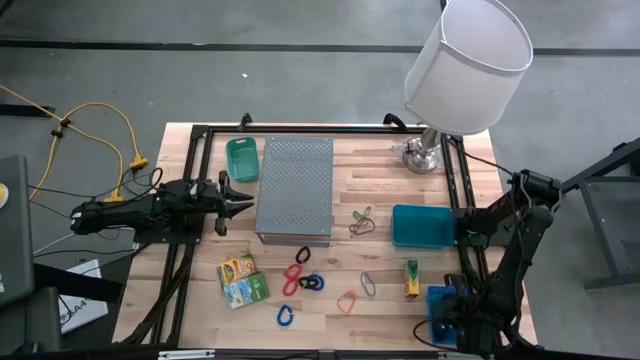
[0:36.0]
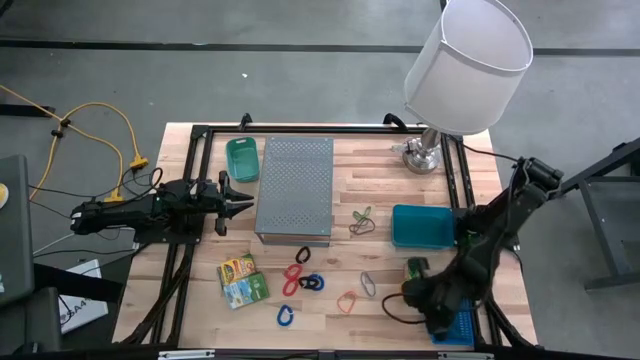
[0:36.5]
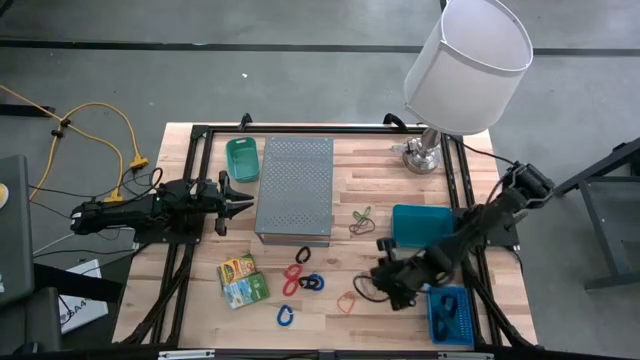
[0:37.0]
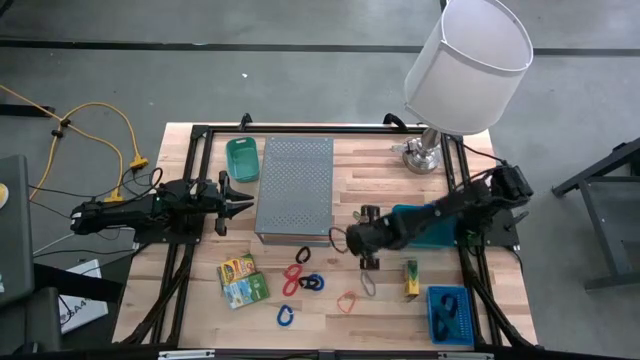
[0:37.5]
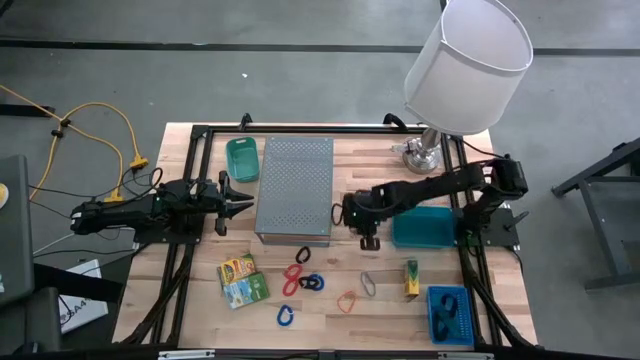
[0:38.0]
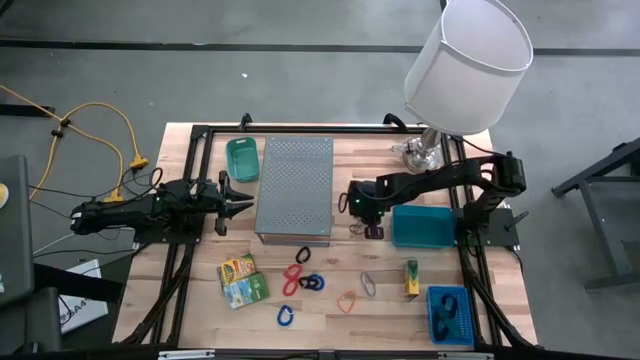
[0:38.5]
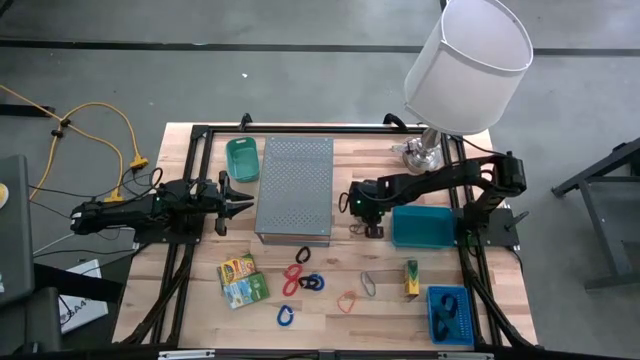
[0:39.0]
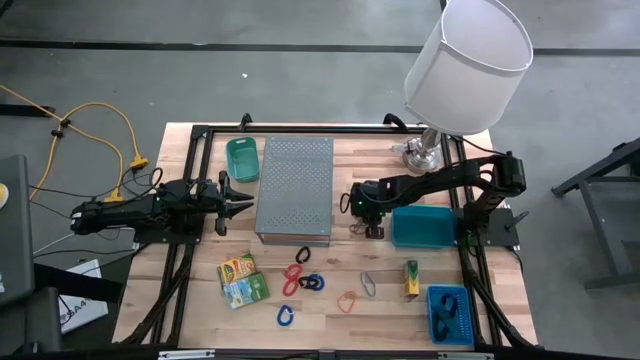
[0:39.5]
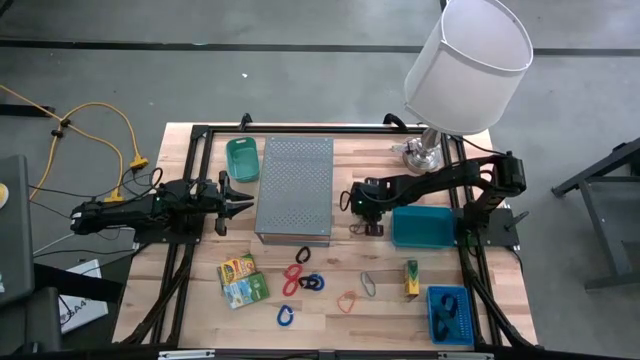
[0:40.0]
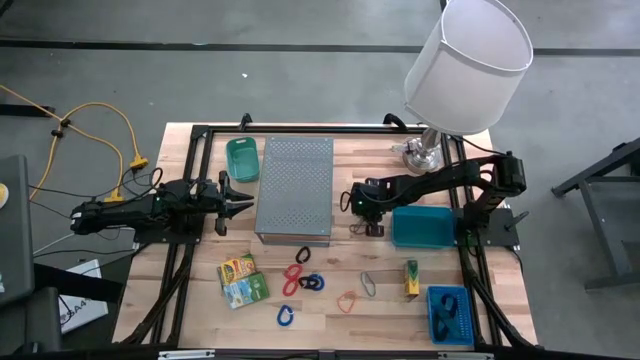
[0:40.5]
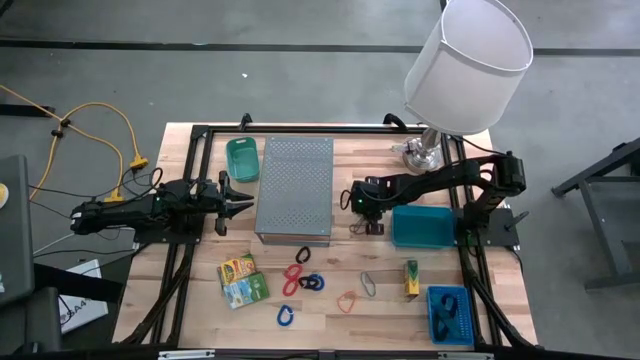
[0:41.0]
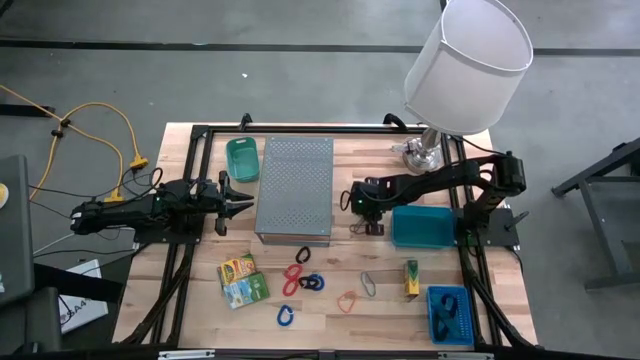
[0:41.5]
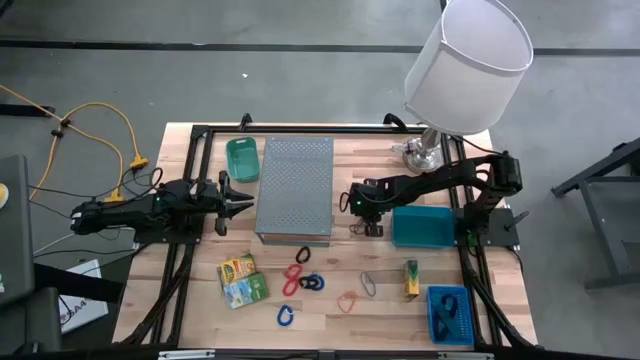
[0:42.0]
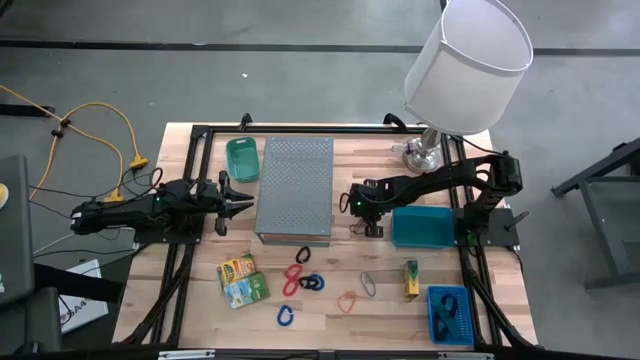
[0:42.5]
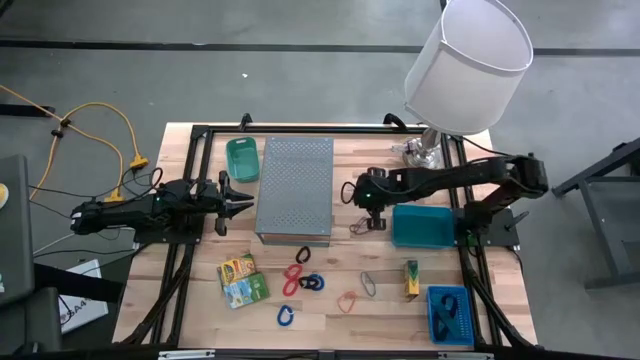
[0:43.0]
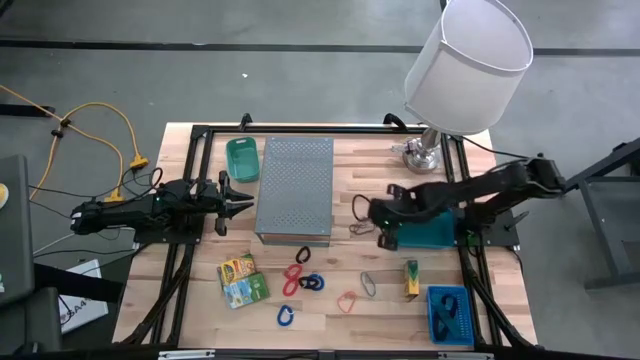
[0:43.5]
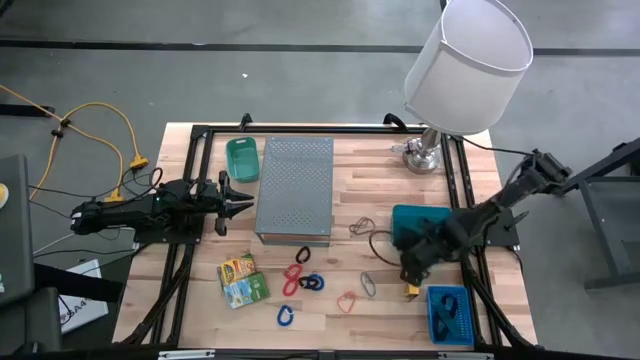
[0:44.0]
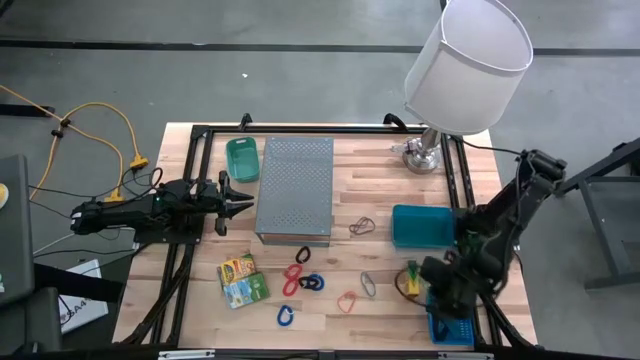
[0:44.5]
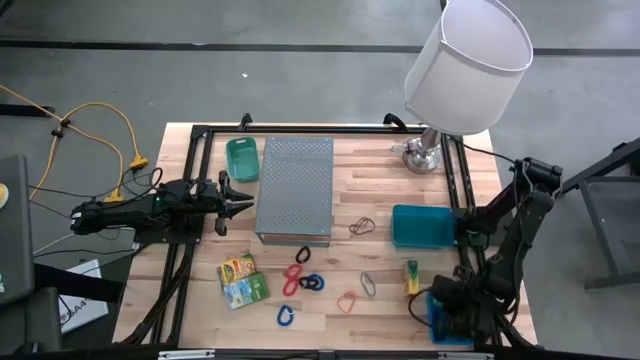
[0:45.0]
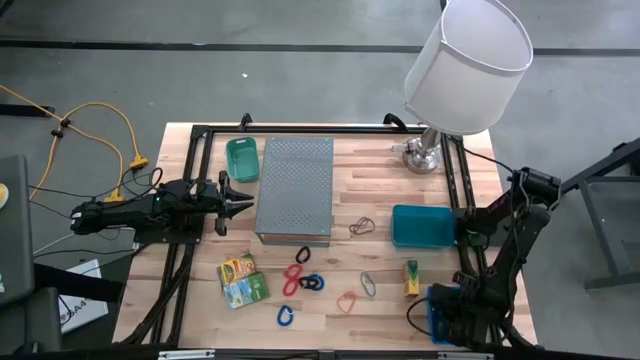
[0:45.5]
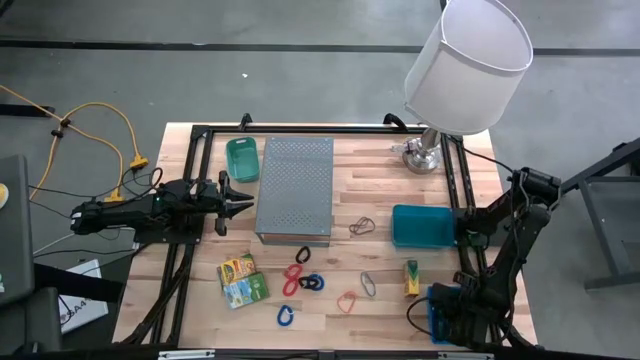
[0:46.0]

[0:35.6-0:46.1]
Task: Pick & Place Office Desk Supplies
Put the green rubberband into the blue basket

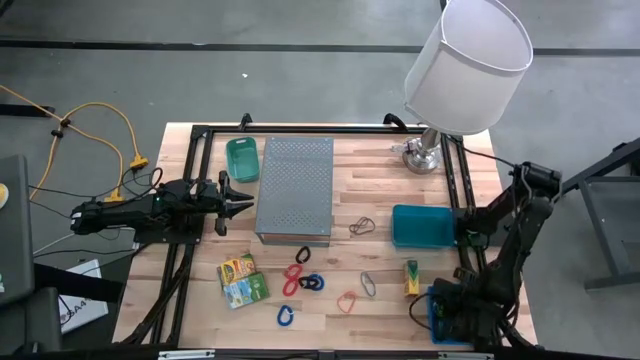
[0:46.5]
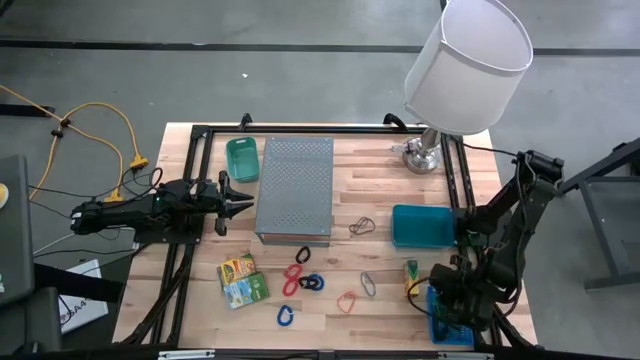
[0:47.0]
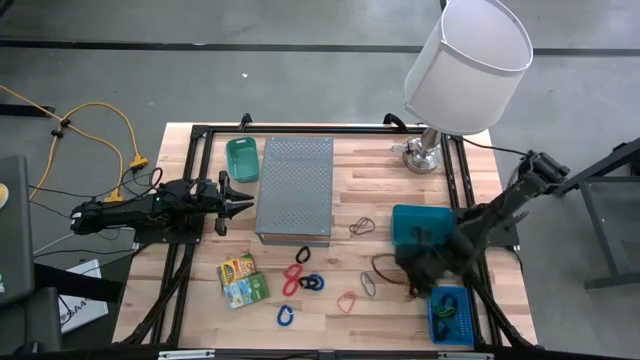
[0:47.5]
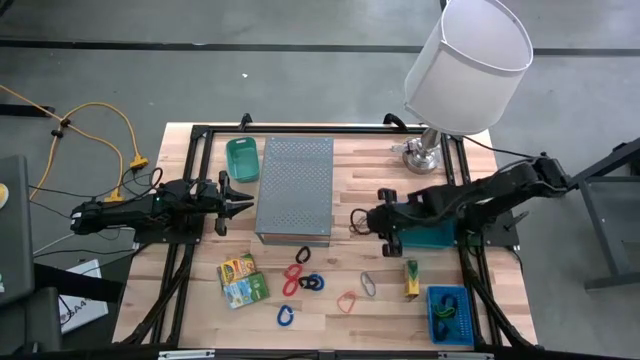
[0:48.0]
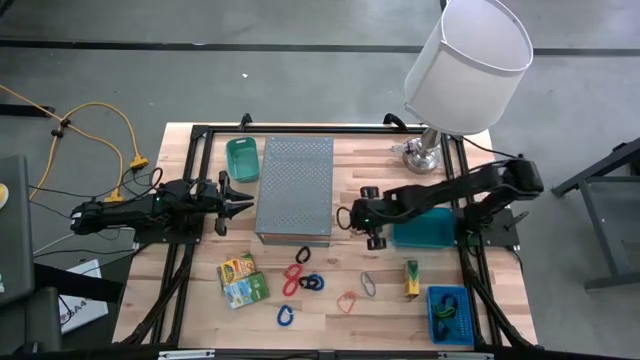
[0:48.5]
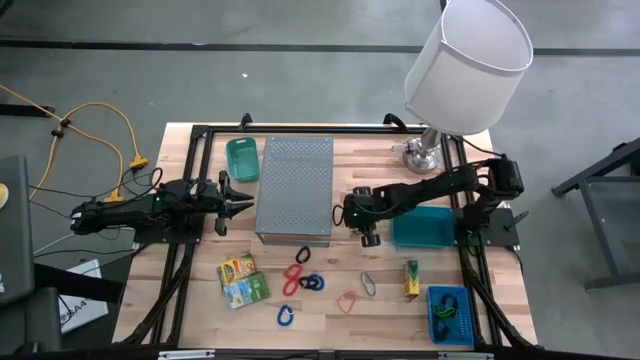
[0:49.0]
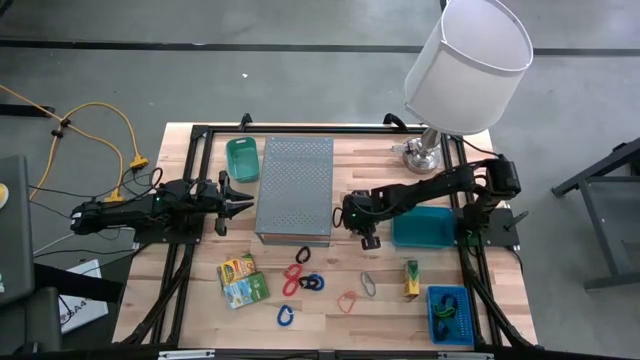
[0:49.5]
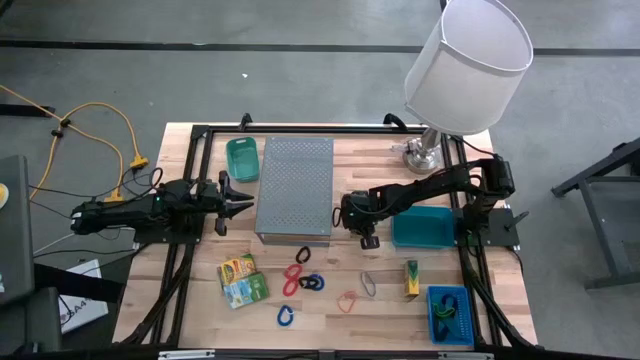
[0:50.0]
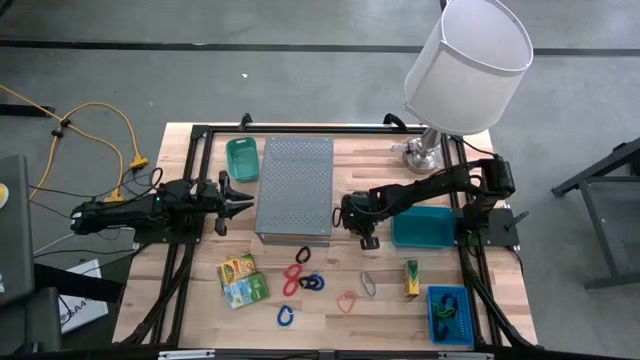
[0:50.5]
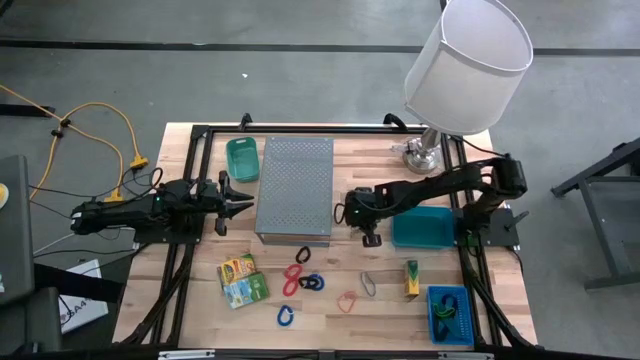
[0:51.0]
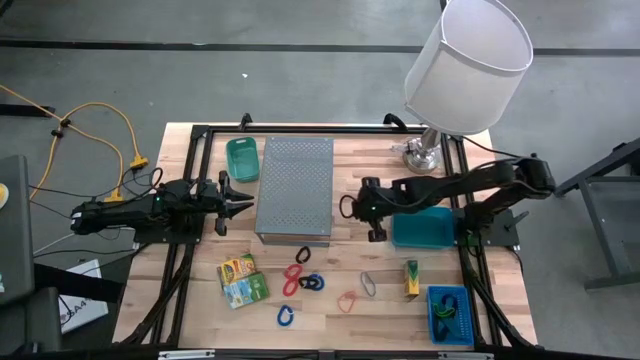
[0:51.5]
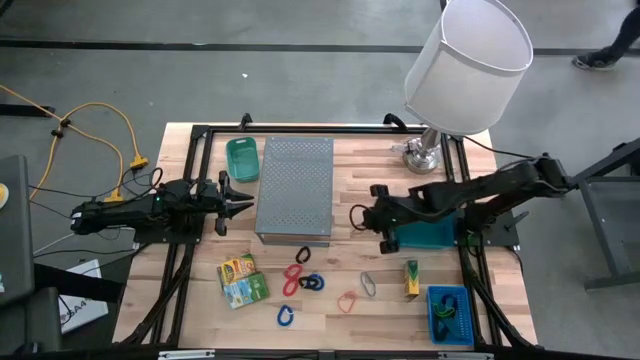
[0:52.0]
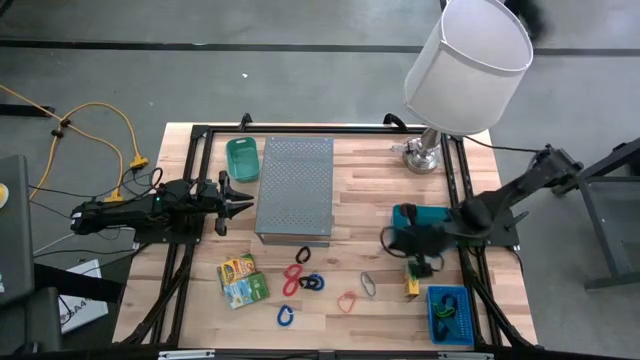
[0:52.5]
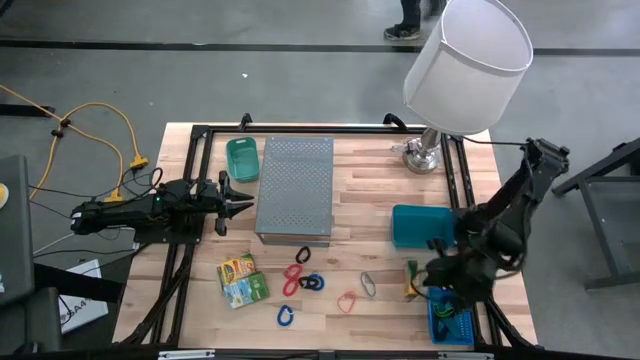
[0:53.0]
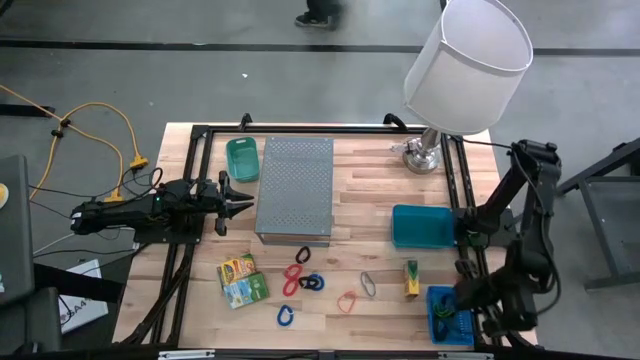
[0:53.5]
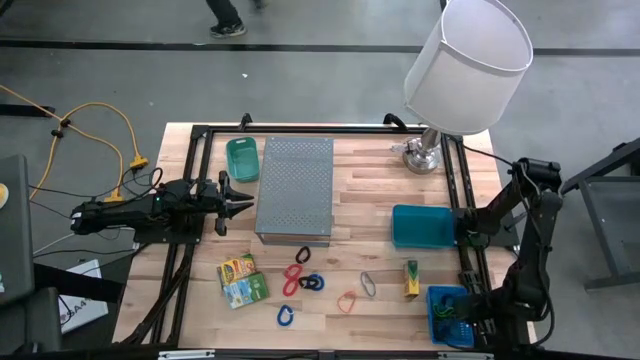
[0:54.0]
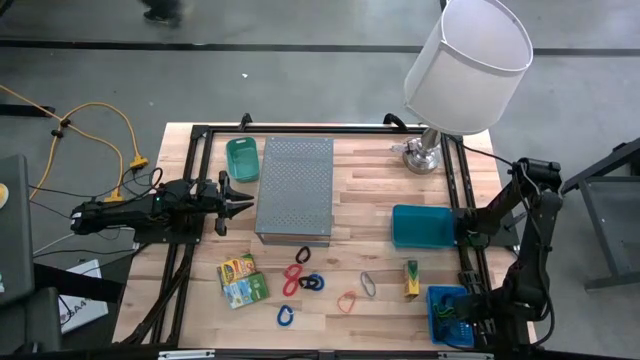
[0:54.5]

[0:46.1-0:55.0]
Put the purple rubberband into the blue basket

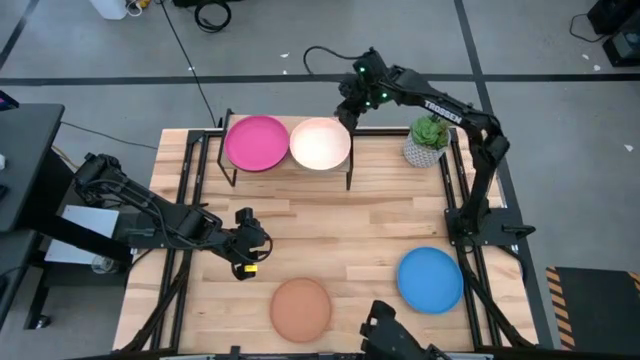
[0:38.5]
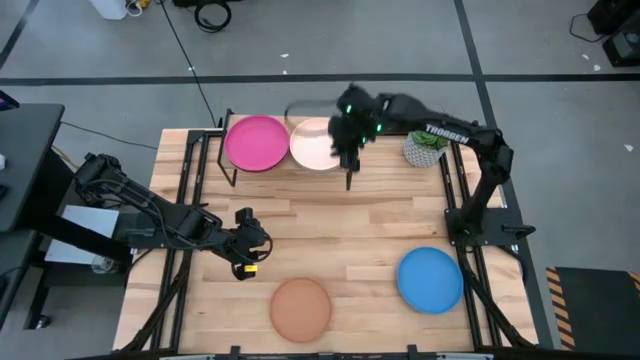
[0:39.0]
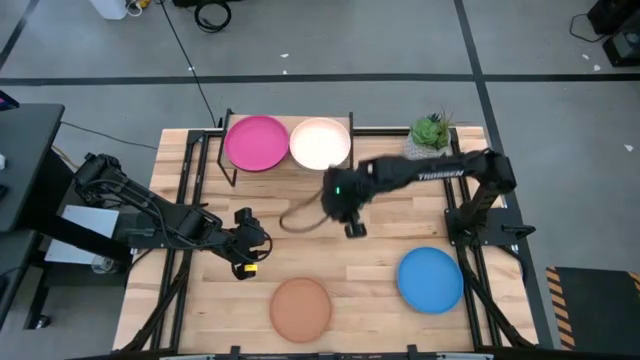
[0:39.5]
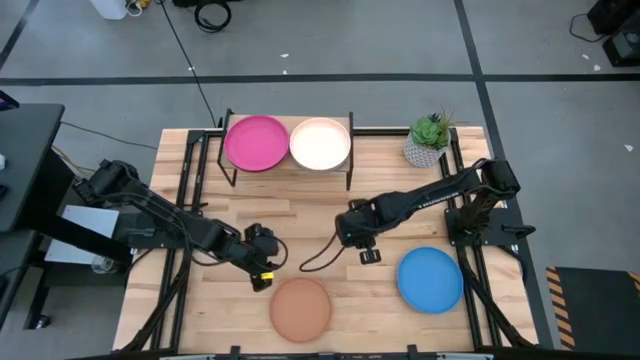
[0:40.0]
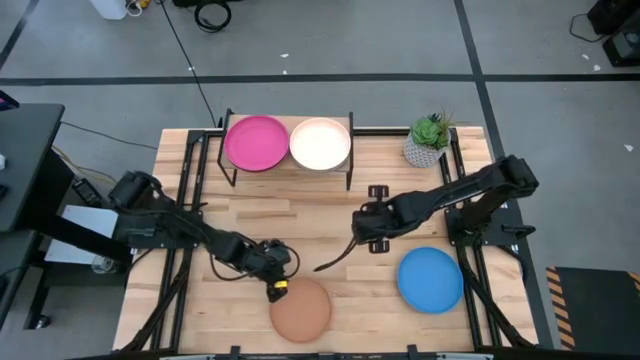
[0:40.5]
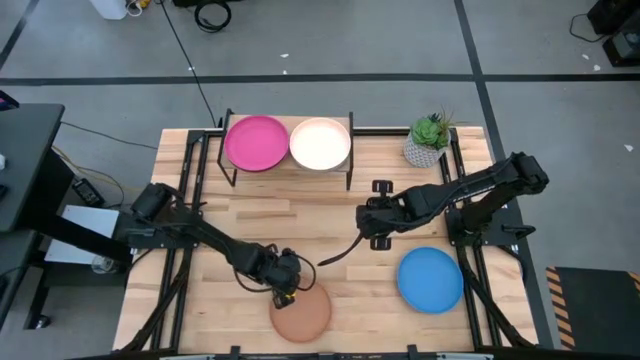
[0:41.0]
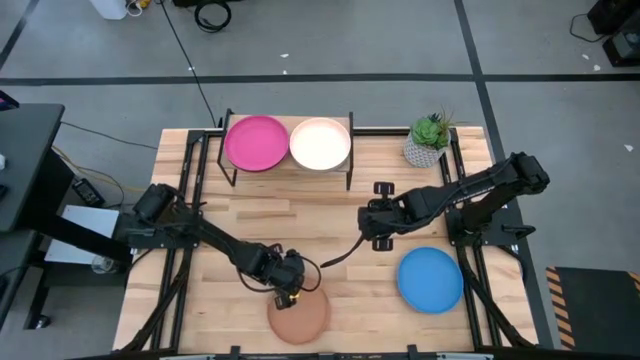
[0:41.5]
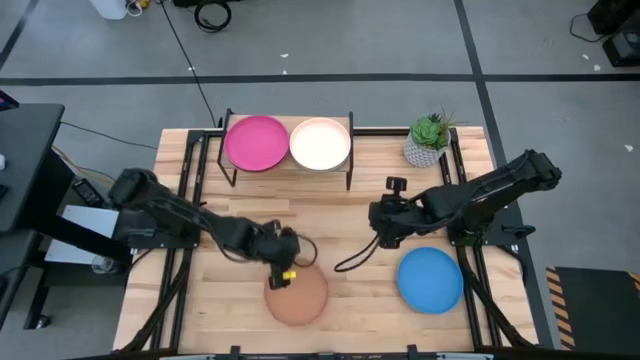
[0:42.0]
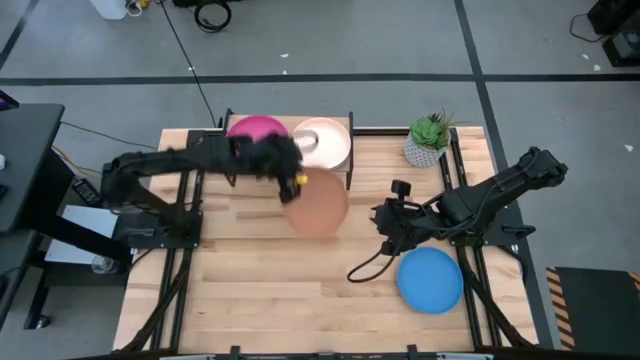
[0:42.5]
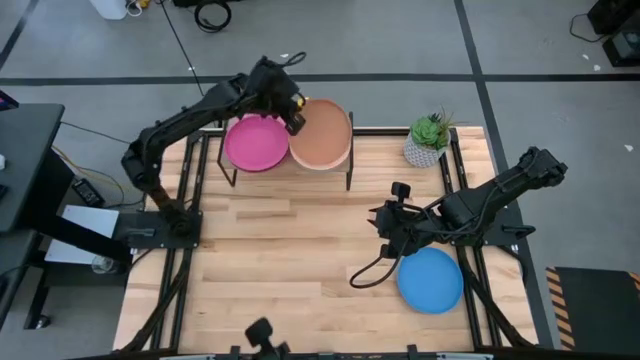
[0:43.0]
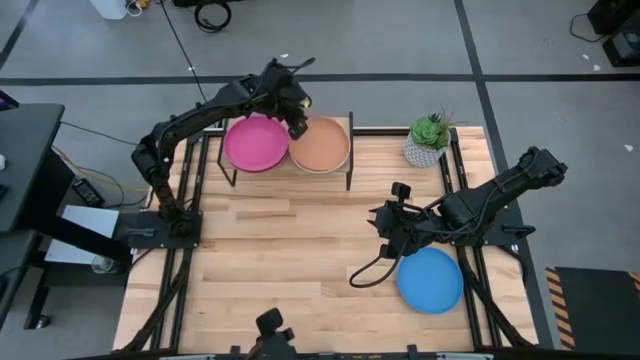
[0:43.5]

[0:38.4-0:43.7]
Task: Place and stack plates onto a shelf
Stack the light brown plate on the top of the light white plate
